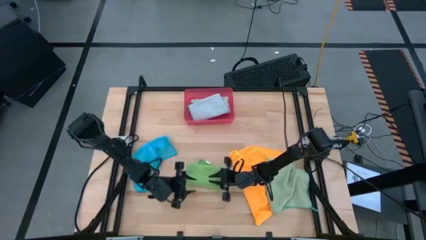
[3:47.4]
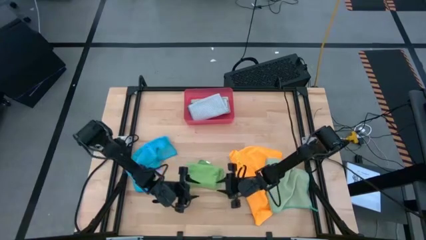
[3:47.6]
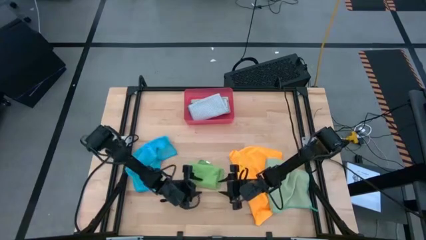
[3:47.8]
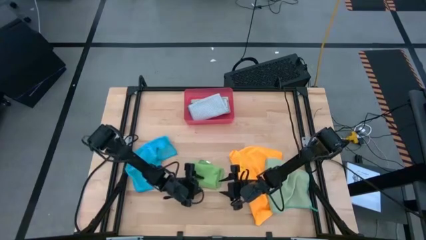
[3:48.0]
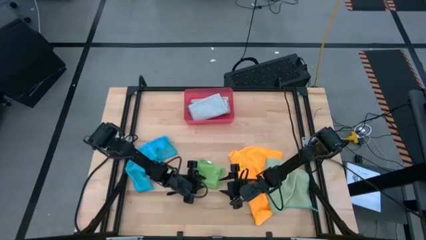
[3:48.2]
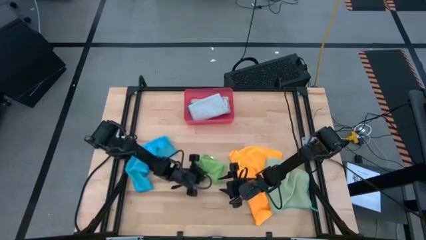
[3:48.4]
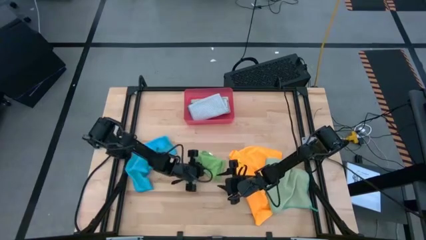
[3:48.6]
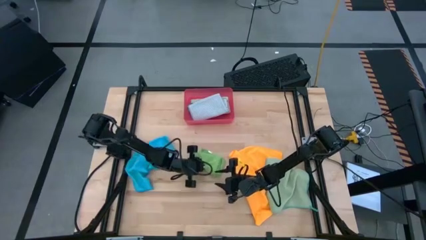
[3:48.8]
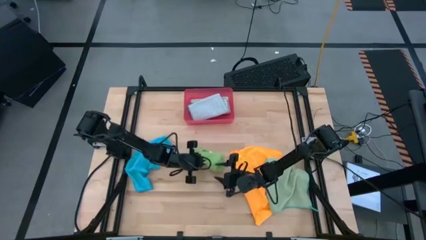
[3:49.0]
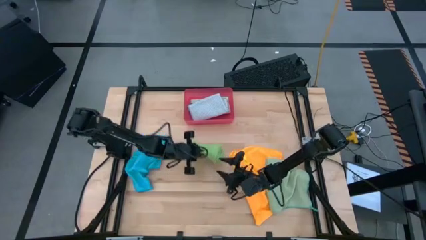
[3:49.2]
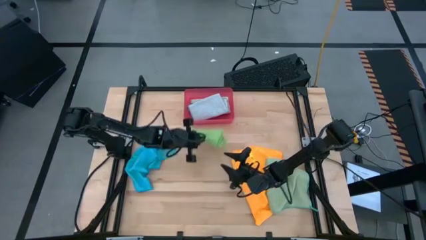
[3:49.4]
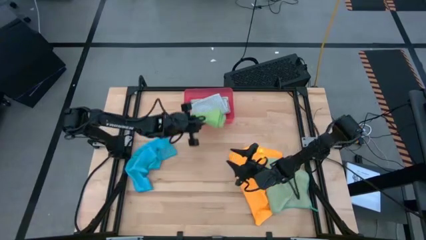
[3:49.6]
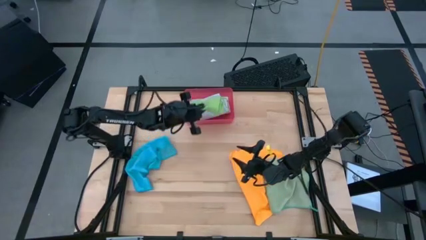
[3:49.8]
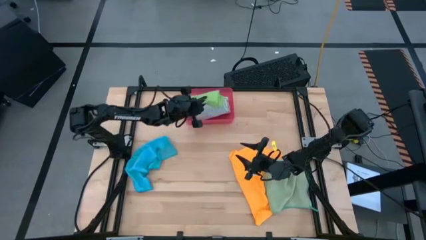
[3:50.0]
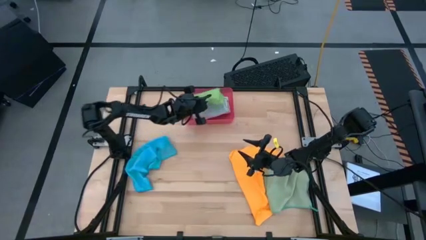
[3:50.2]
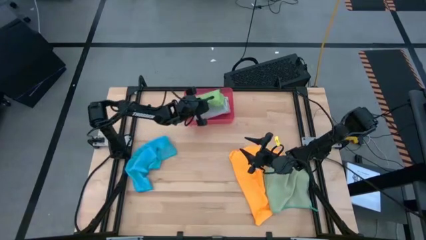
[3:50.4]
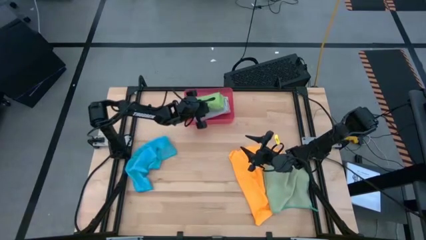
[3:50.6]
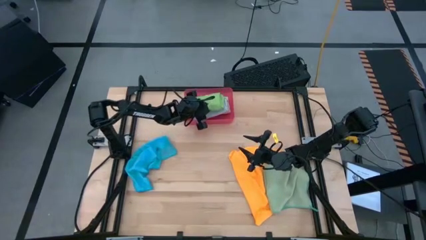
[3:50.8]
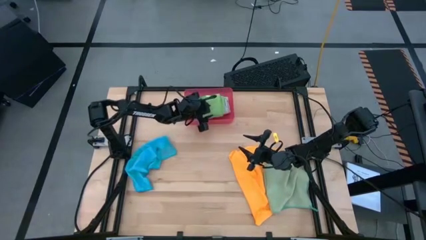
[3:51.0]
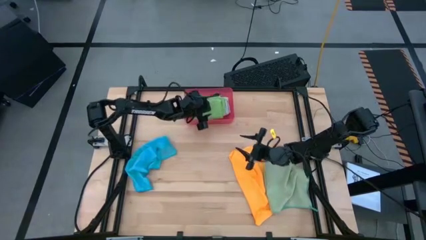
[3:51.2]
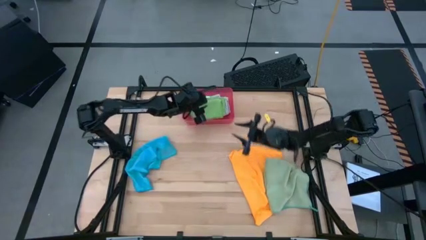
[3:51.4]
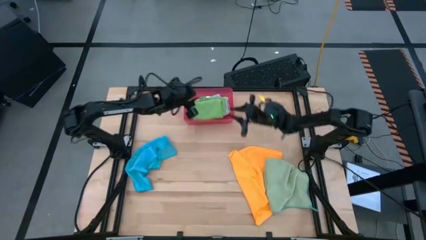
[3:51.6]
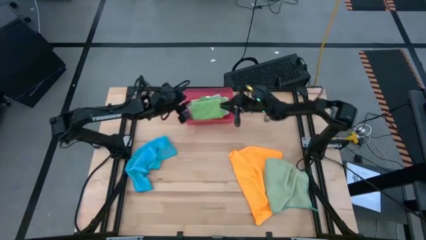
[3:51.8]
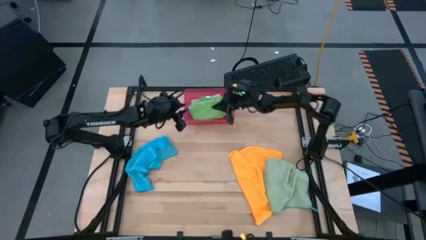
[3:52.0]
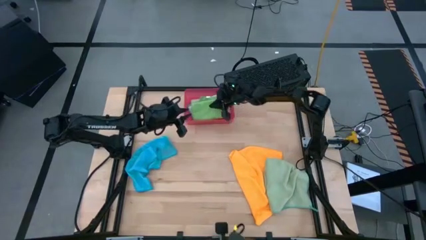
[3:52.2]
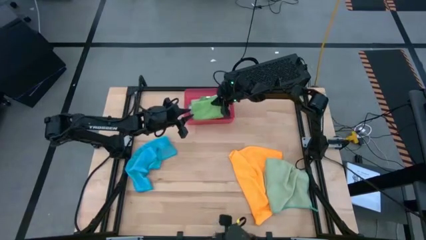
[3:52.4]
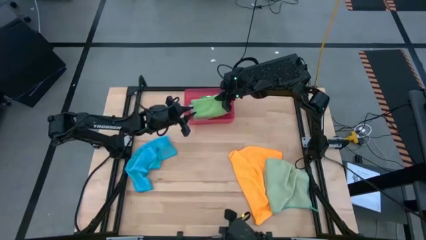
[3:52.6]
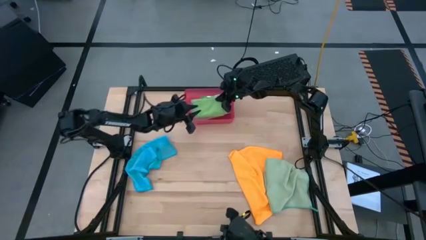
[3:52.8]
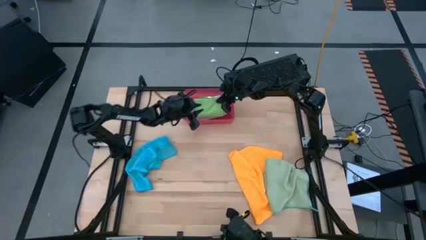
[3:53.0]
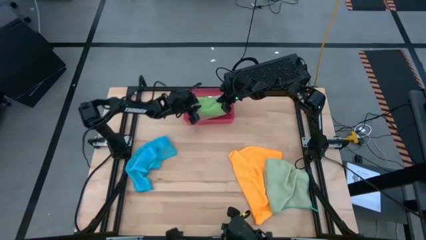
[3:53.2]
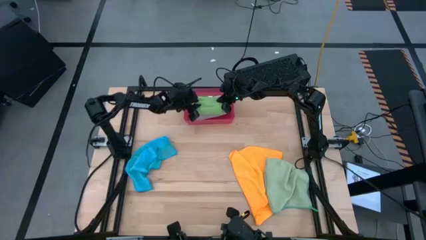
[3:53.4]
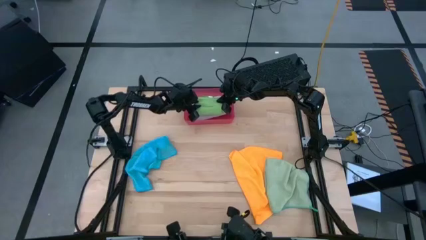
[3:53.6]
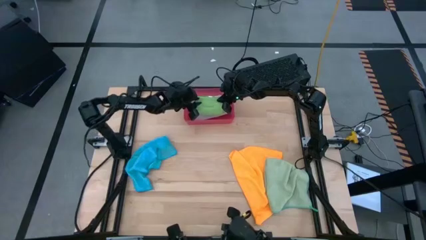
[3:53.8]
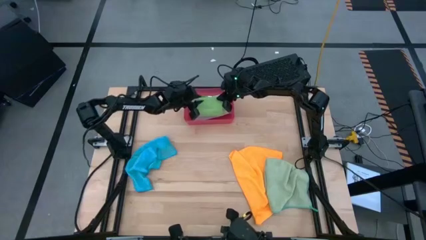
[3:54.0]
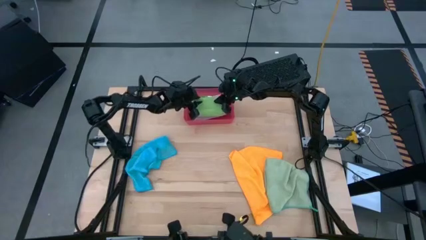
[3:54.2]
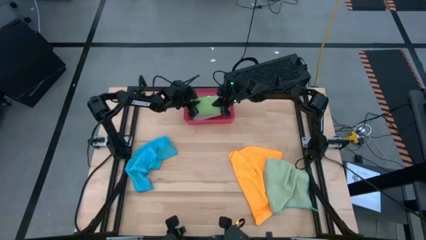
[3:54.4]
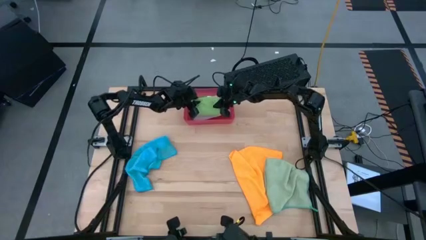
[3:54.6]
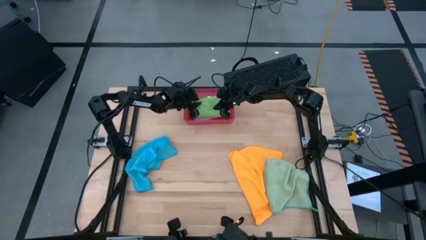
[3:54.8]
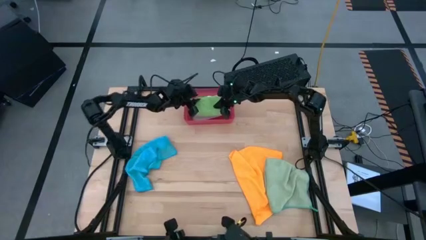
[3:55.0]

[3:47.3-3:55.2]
Task: Fold microfiber towels
Stack the folded green towel on top of the folded gray towel in the red bin

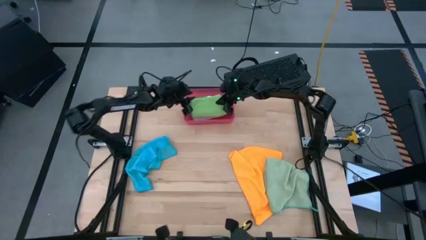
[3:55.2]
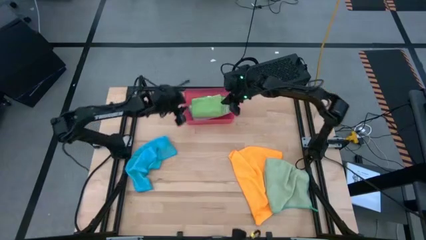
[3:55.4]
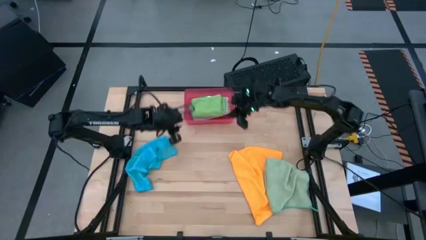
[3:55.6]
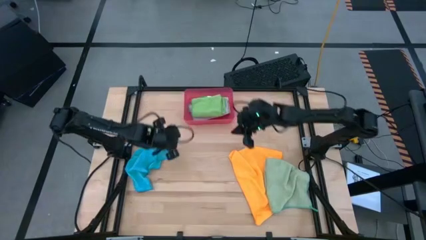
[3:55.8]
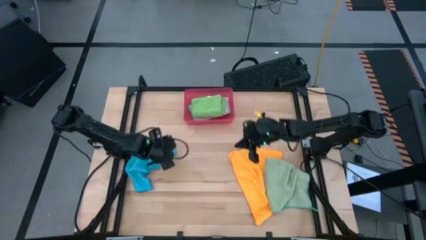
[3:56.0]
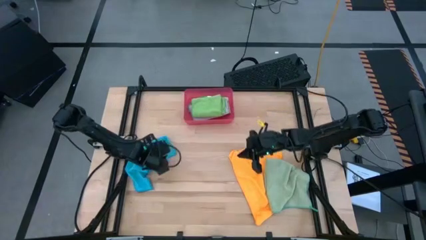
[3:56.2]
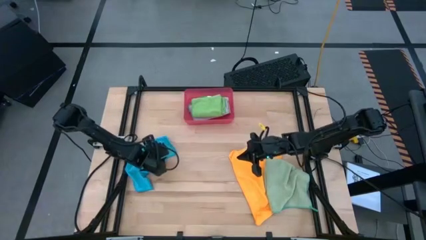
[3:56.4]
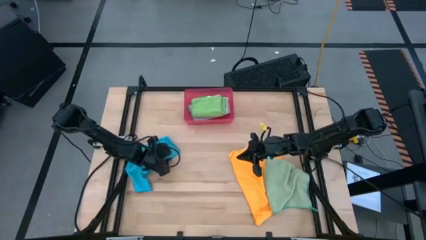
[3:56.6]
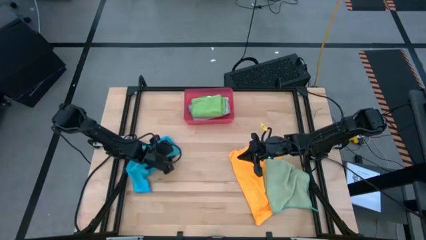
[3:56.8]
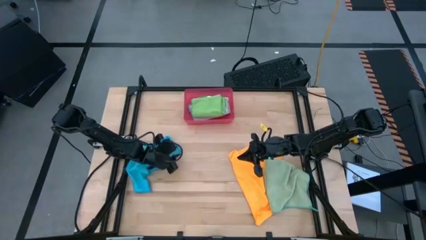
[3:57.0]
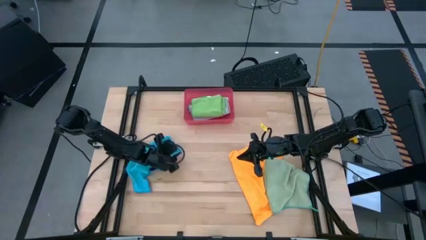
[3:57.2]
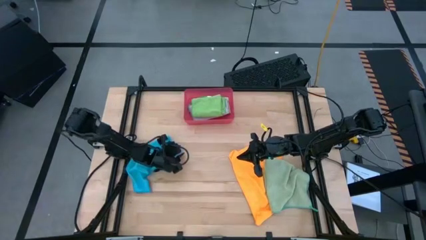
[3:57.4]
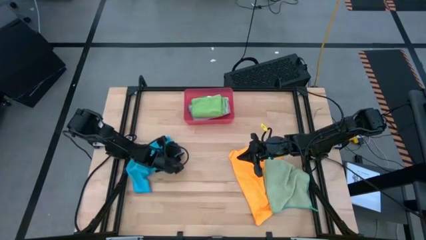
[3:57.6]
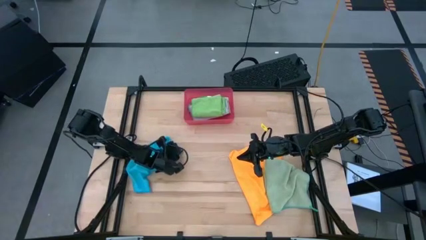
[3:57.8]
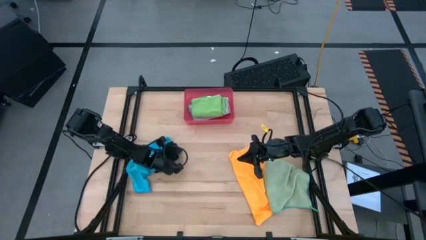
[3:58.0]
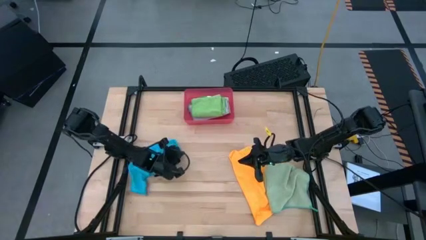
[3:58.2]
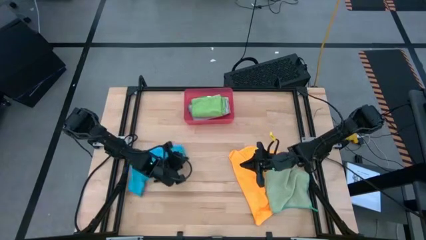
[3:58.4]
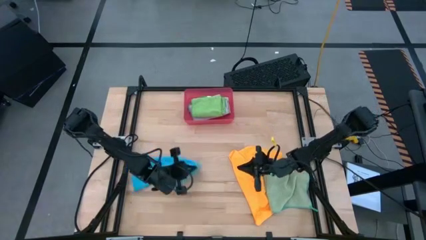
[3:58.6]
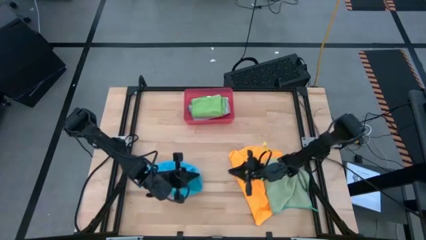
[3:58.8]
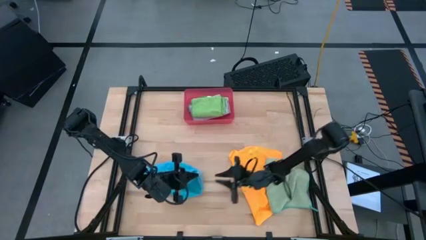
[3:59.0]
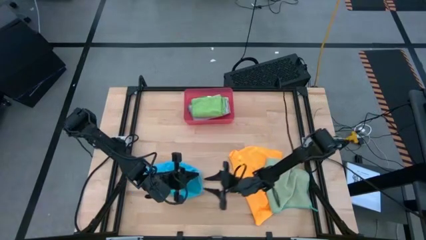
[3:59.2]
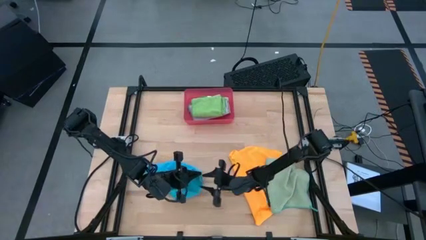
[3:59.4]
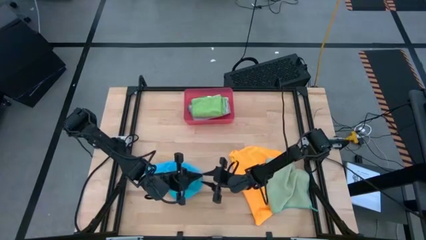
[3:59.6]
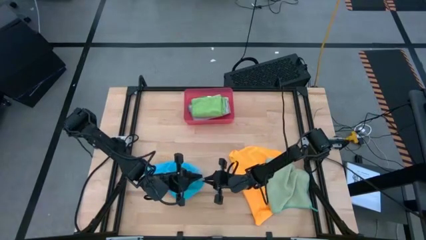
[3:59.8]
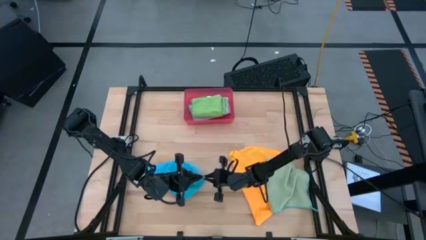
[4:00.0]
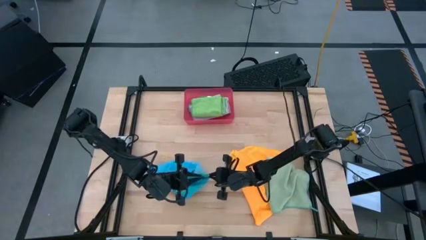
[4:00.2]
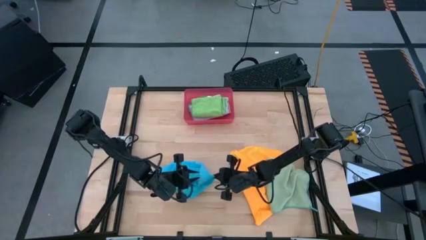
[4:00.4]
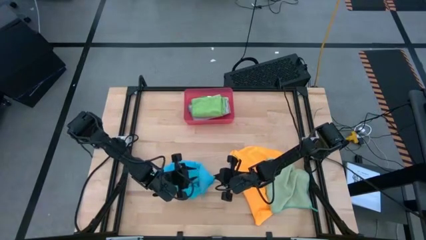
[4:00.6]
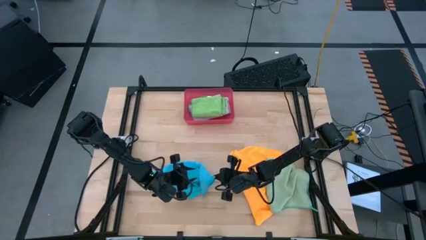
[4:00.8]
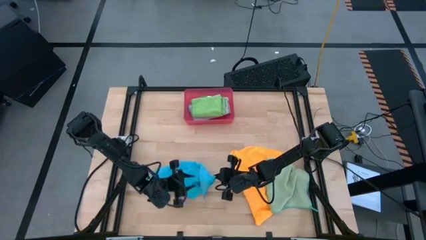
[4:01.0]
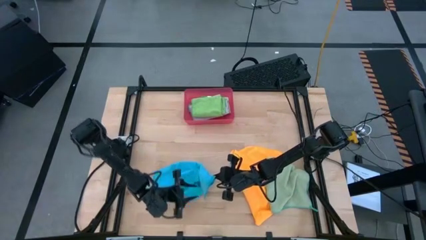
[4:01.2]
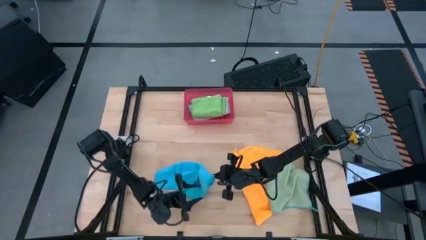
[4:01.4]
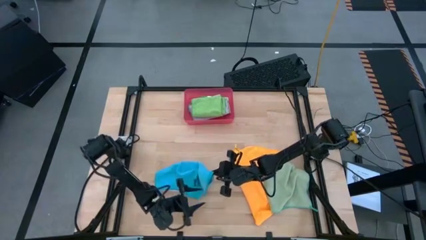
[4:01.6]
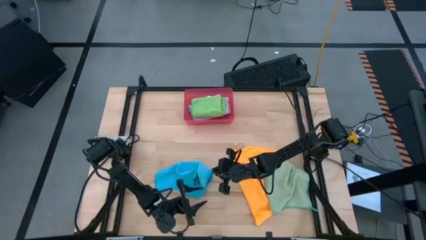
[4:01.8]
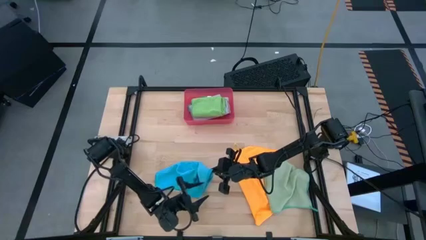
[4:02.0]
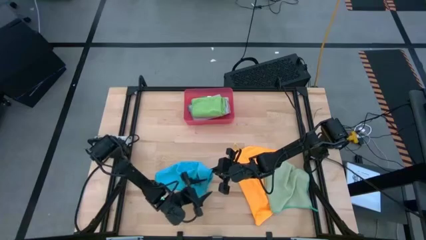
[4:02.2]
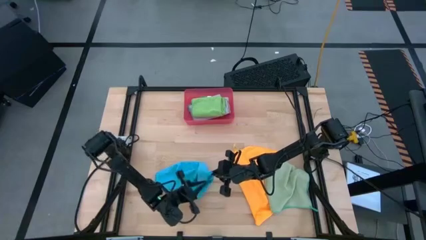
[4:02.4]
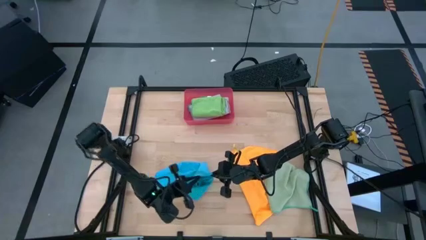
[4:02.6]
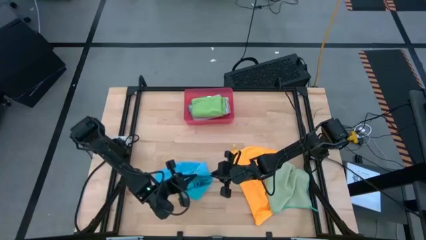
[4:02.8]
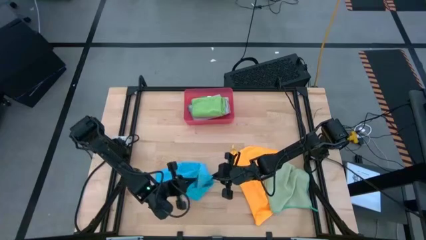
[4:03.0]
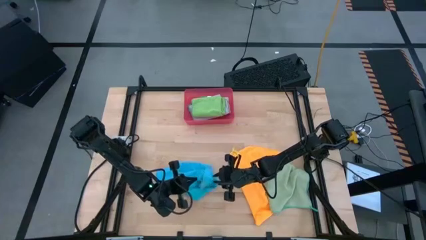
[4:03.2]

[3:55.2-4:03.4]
Fold the blue towel
